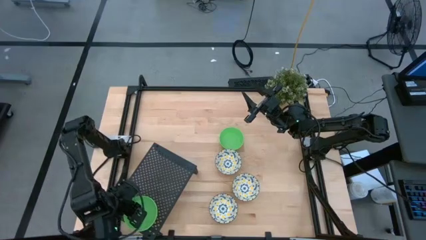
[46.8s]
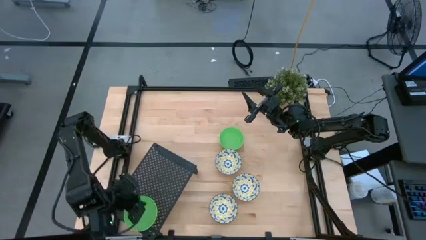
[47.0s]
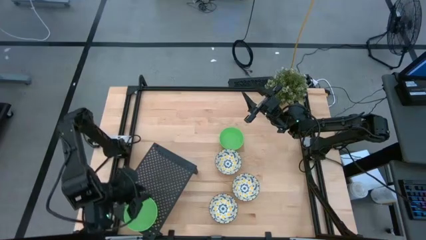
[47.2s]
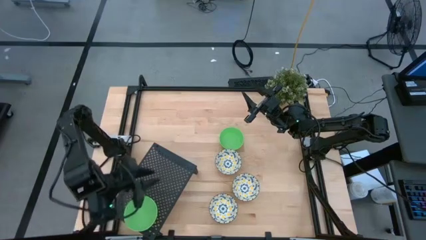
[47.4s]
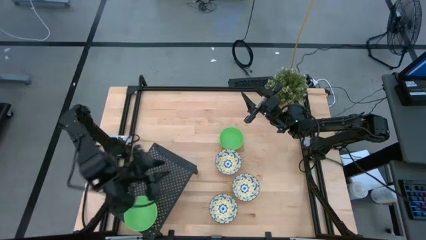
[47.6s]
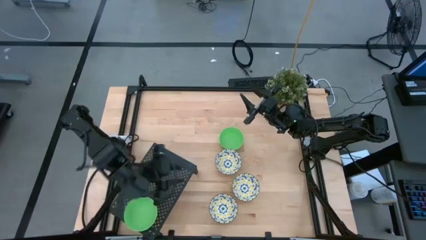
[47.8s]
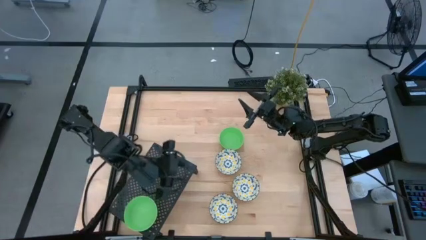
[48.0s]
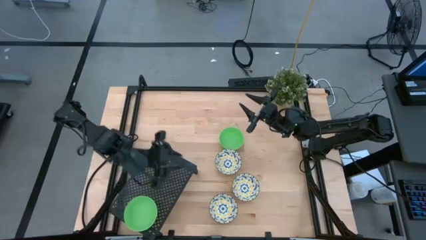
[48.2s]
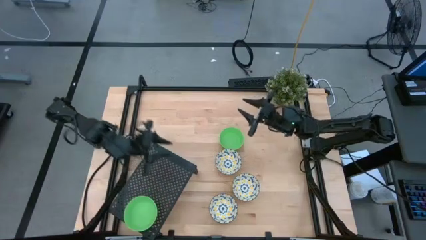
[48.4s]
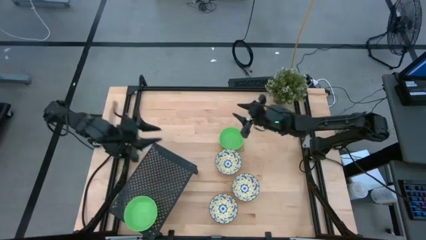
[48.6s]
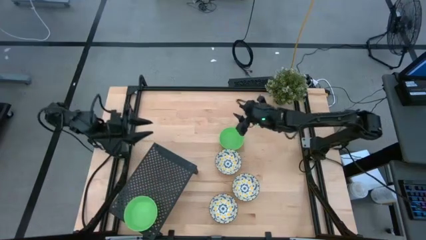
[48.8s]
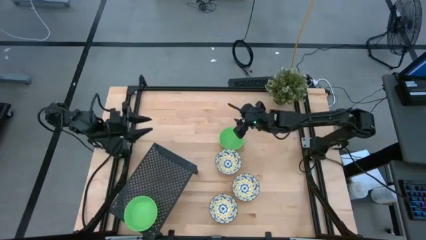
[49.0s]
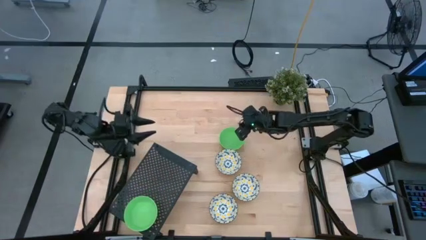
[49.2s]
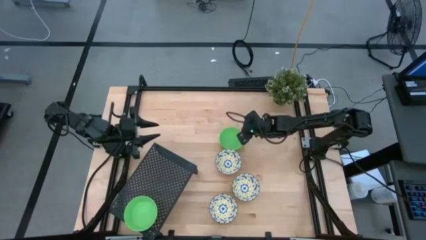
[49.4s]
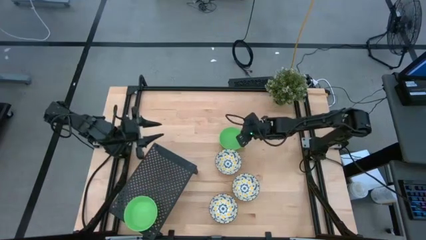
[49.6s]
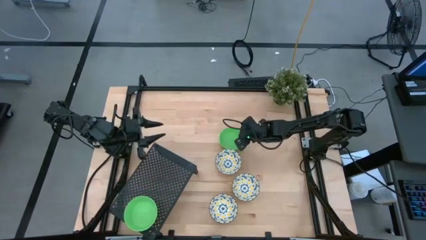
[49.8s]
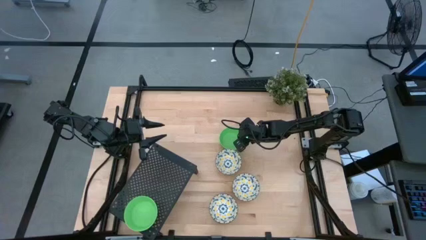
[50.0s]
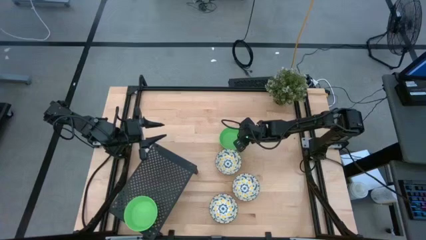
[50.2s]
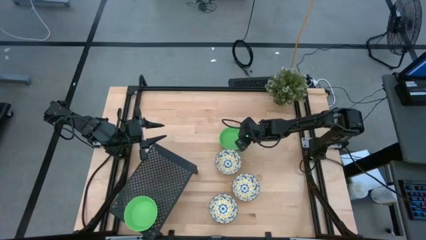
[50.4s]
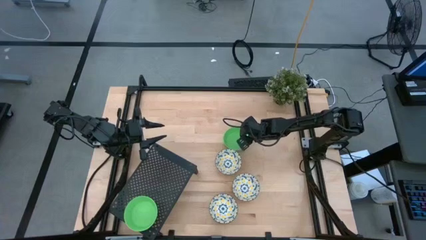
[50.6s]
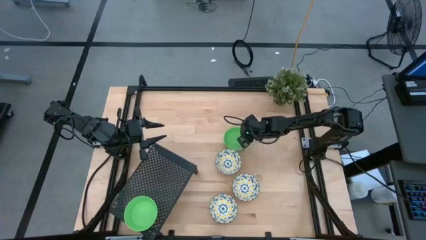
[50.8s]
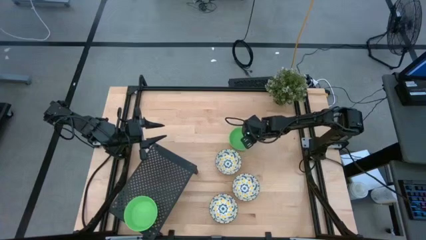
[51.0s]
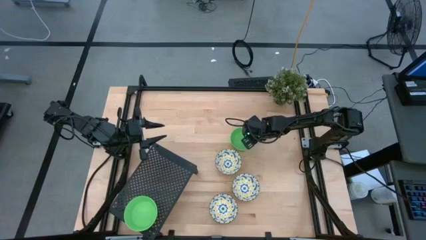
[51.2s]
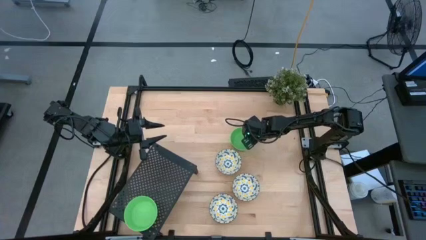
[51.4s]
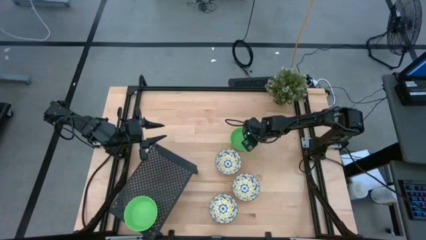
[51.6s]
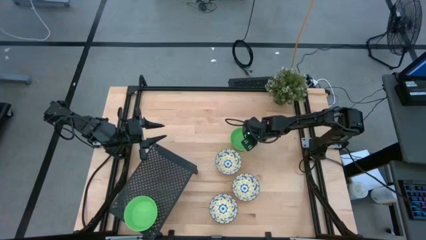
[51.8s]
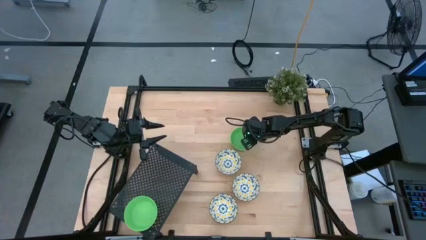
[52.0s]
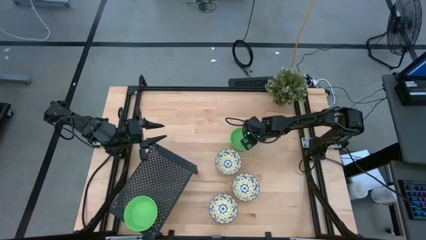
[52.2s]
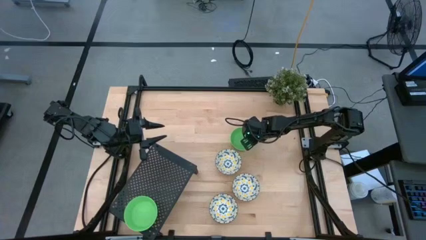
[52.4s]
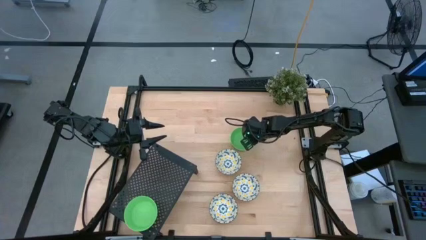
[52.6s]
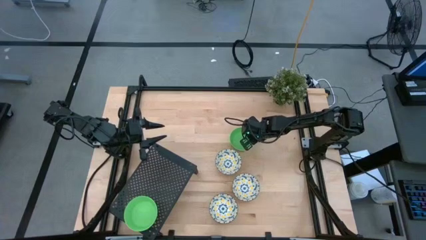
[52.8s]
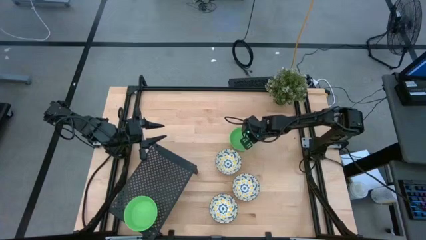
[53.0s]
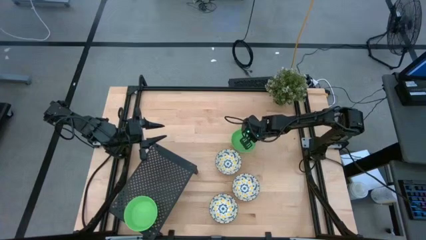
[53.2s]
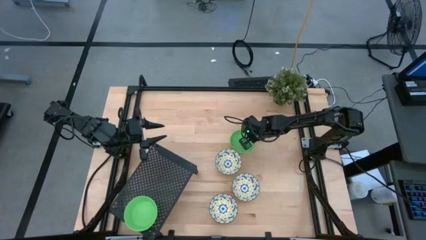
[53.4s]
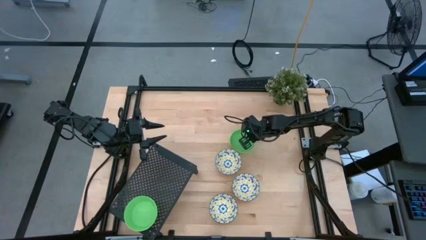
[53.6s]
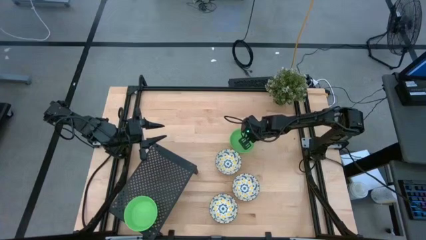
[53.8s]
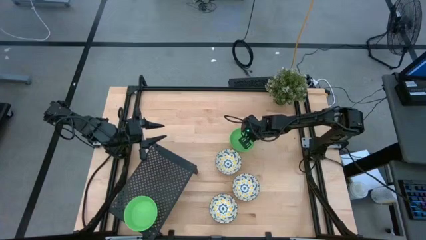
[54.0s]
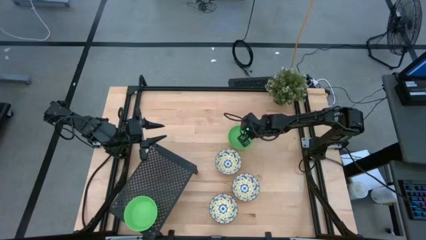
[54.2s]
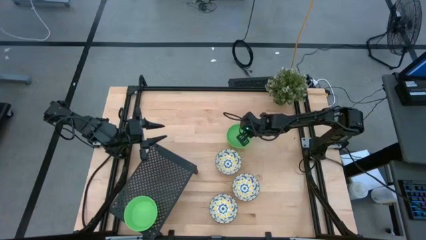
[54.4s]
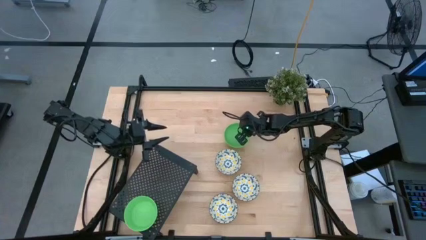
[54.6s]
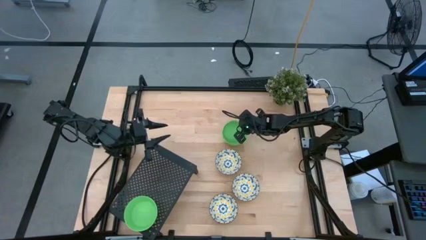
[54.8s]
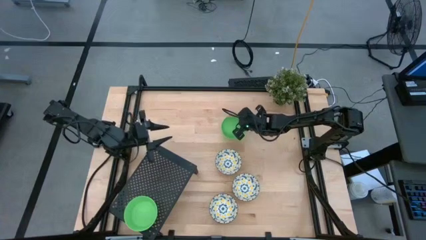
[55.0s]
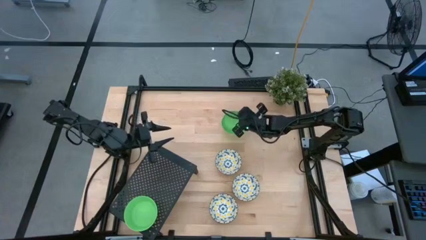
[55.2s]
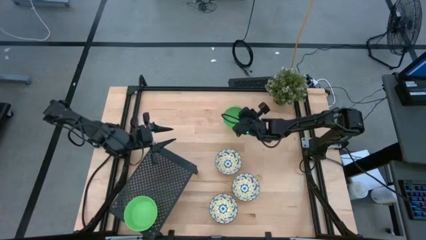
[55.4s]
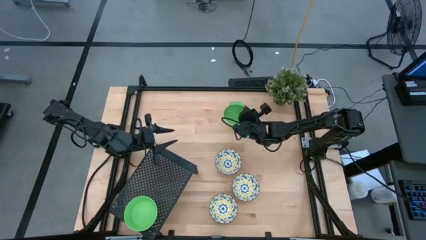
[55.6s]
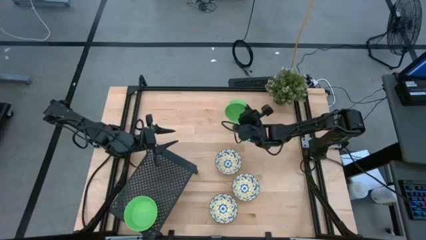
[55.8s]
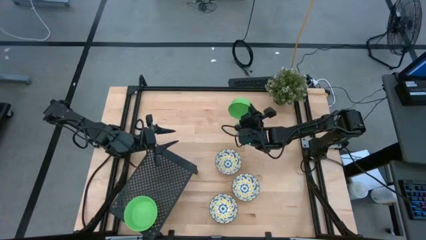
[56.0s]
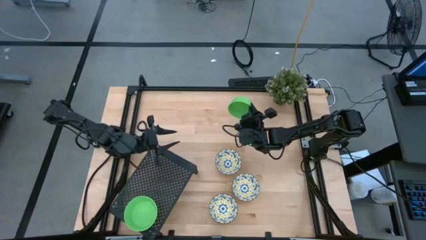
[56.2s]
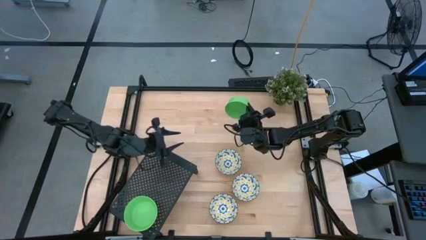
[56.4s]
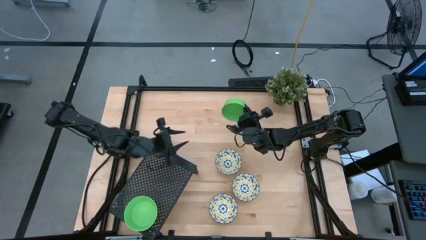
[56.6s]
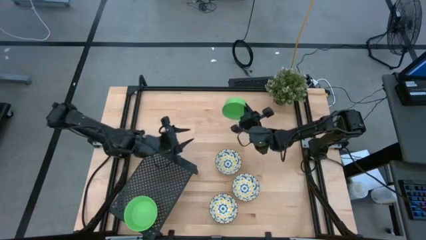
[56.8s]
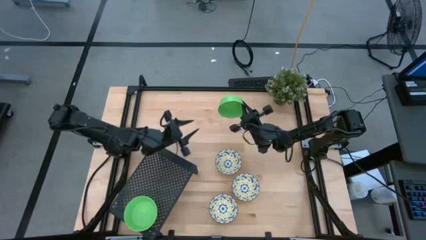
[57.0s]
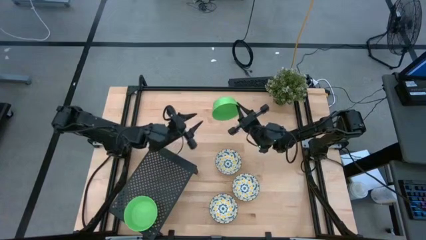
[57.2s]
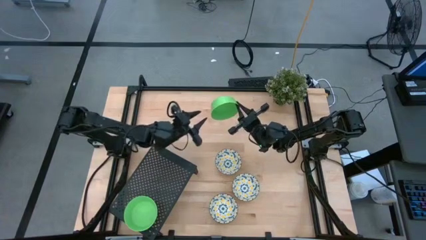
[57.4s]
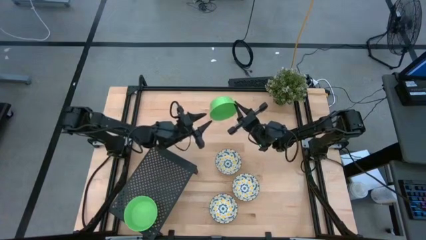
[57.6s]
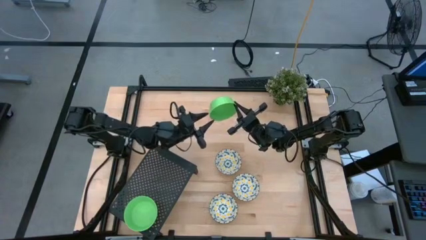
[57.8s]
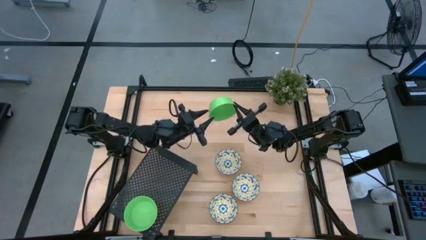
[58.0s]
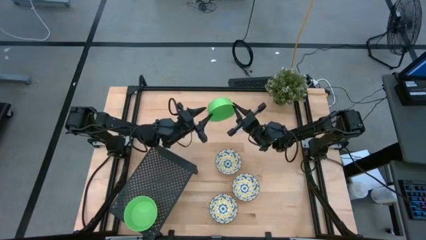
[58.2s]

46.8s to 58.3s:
Task: Pick & Place Mini bowls
Stack the green bowl on the green bowls on the shelf
